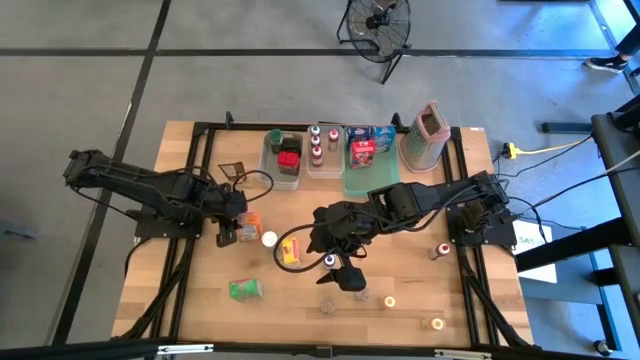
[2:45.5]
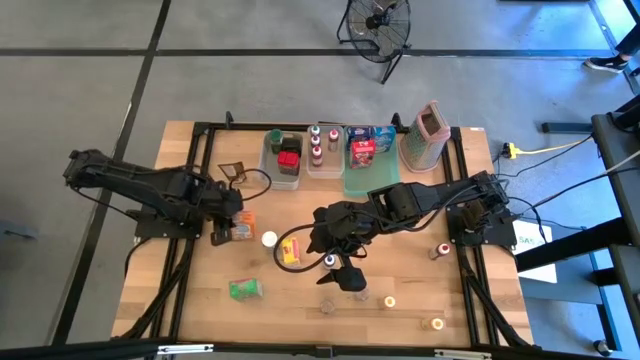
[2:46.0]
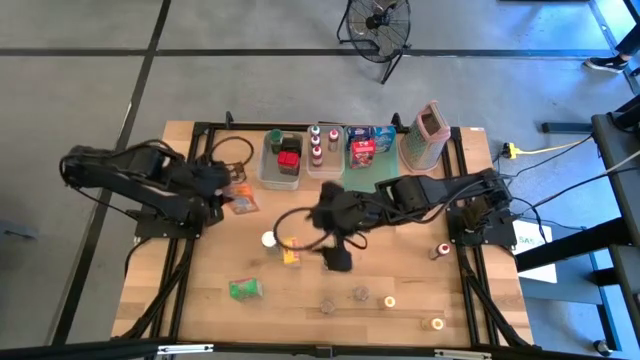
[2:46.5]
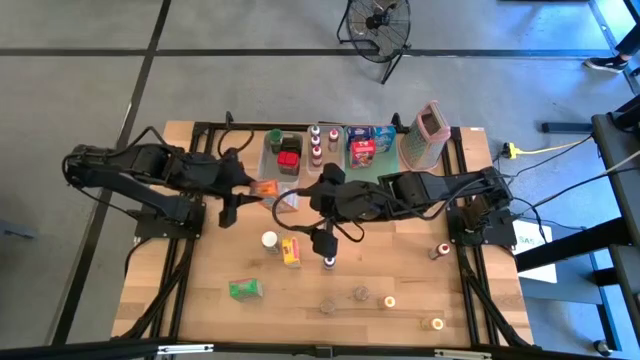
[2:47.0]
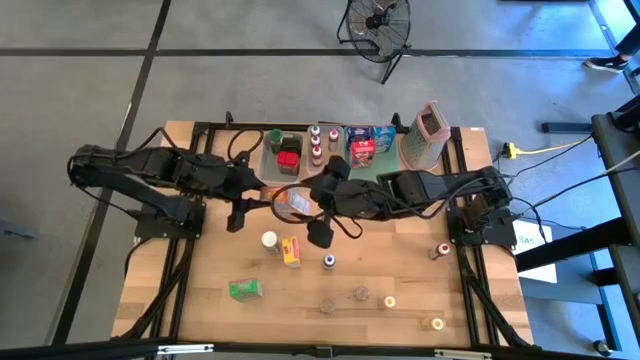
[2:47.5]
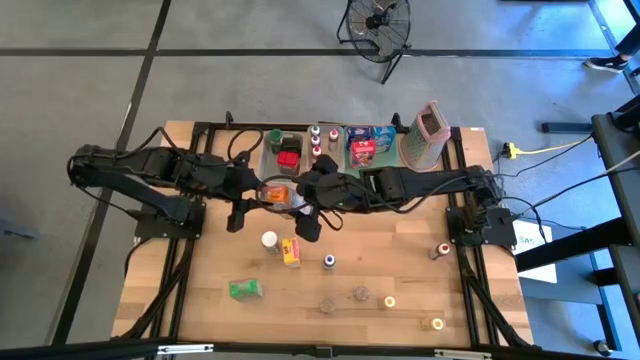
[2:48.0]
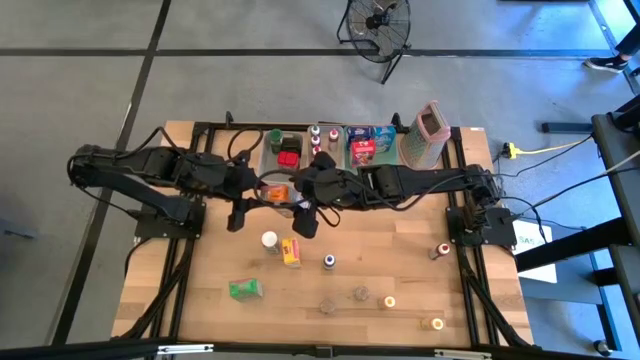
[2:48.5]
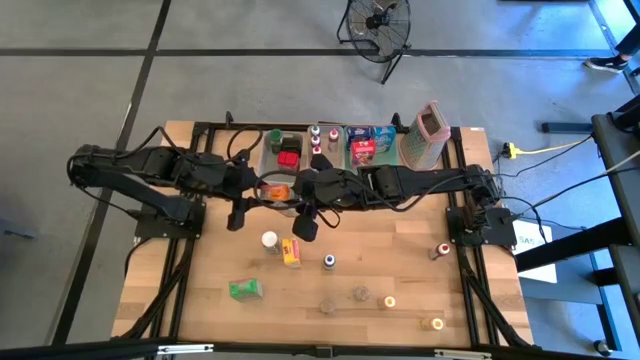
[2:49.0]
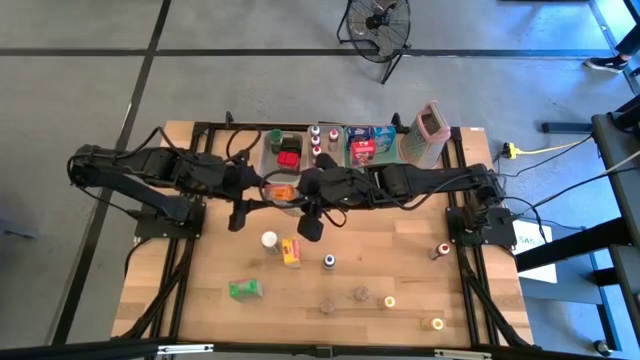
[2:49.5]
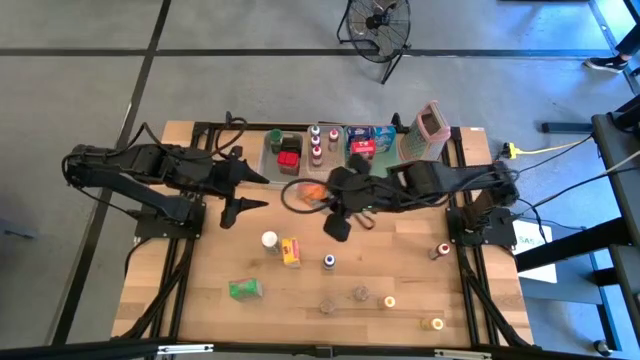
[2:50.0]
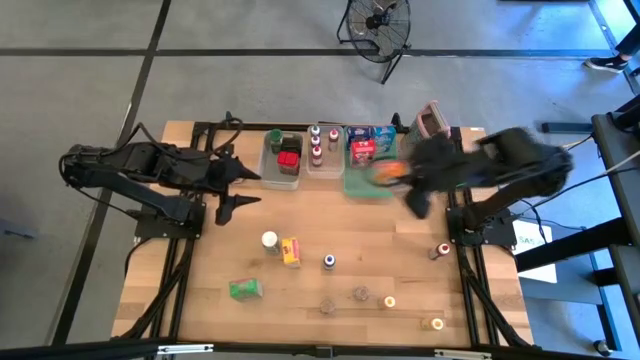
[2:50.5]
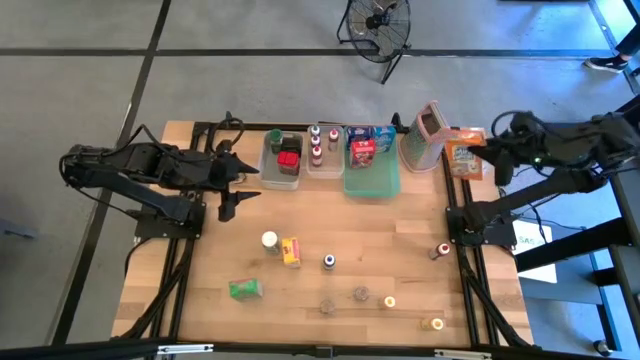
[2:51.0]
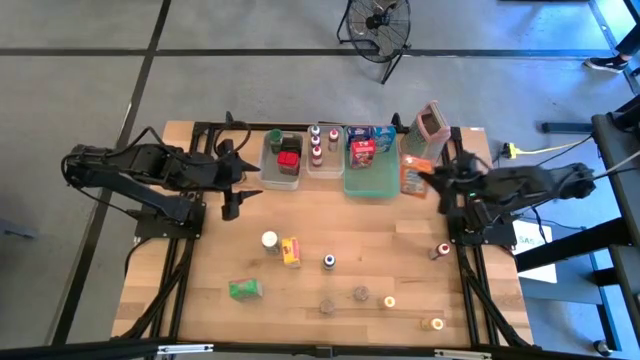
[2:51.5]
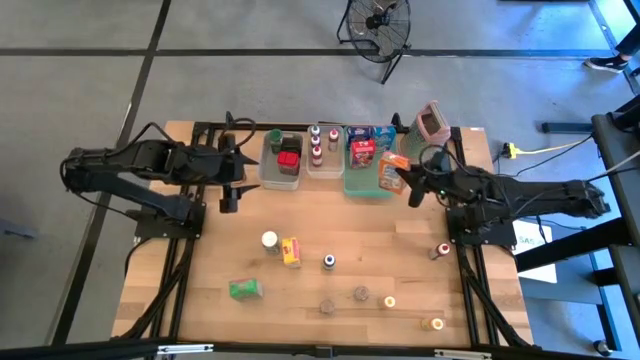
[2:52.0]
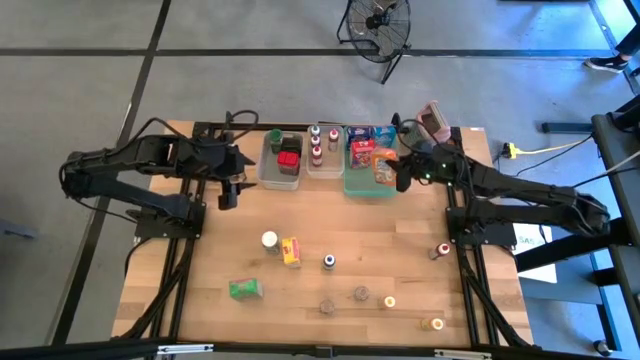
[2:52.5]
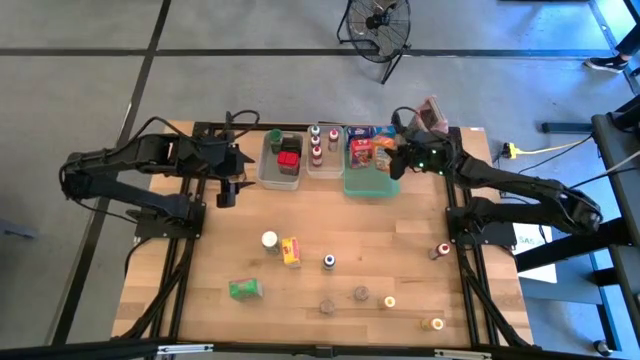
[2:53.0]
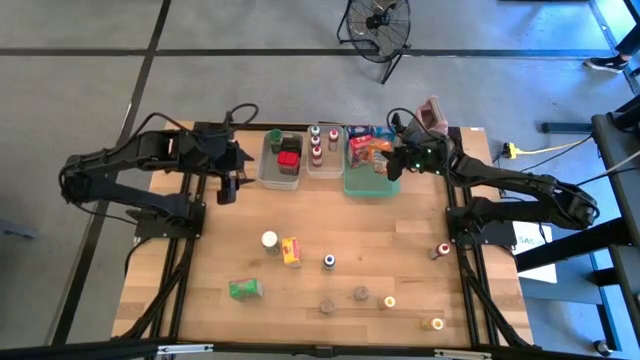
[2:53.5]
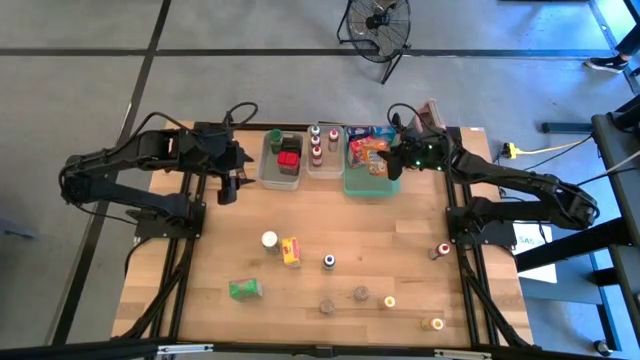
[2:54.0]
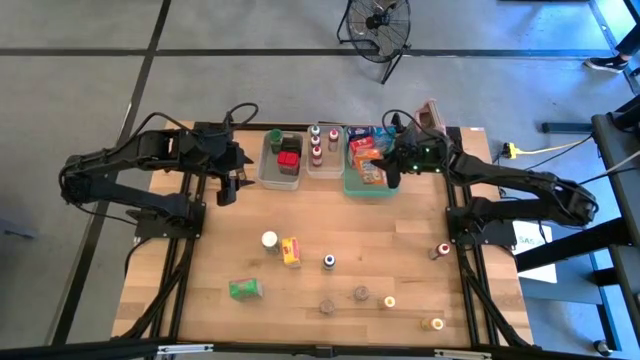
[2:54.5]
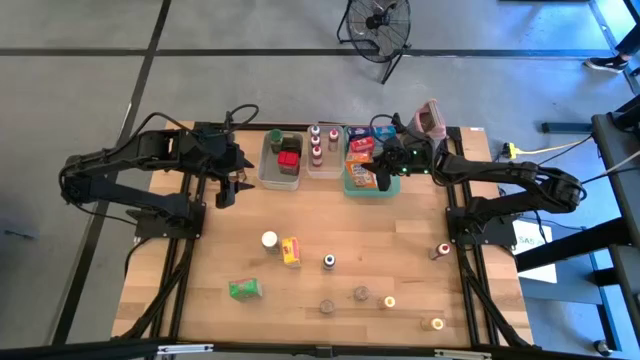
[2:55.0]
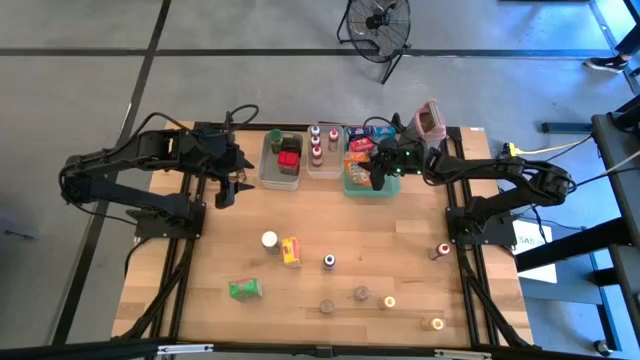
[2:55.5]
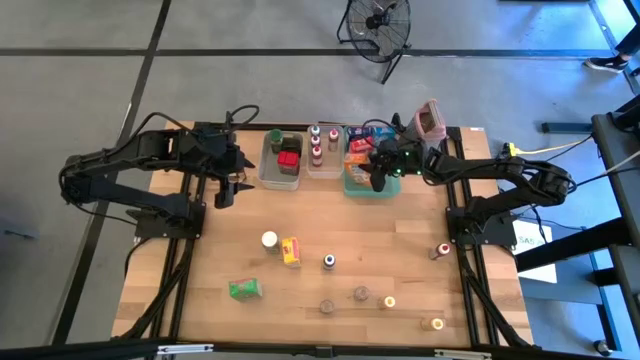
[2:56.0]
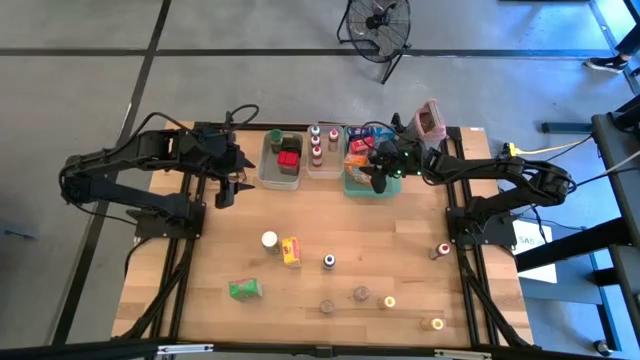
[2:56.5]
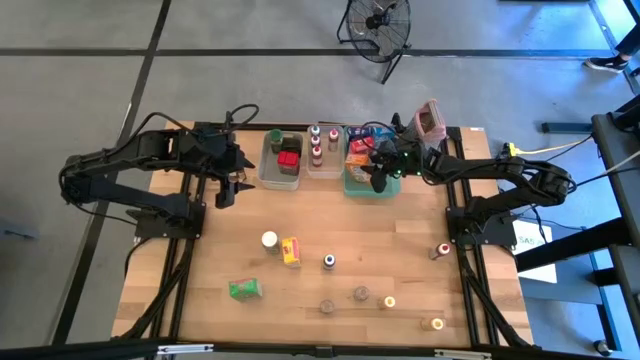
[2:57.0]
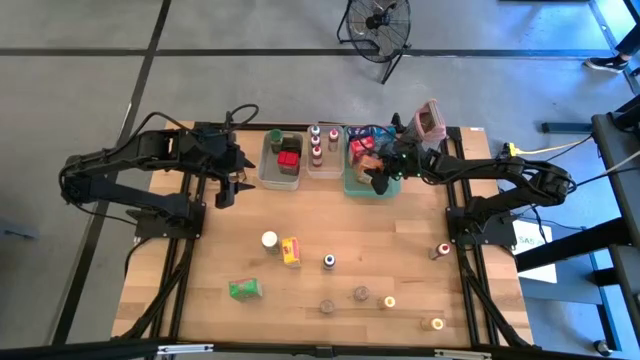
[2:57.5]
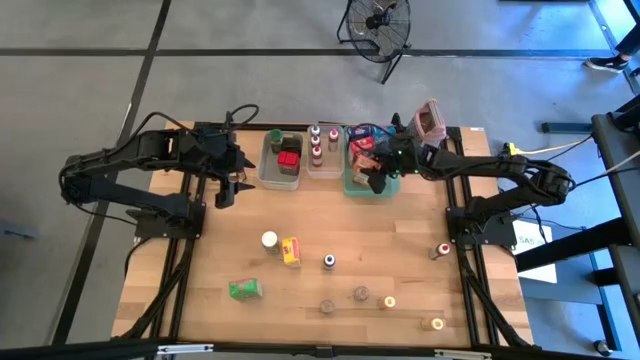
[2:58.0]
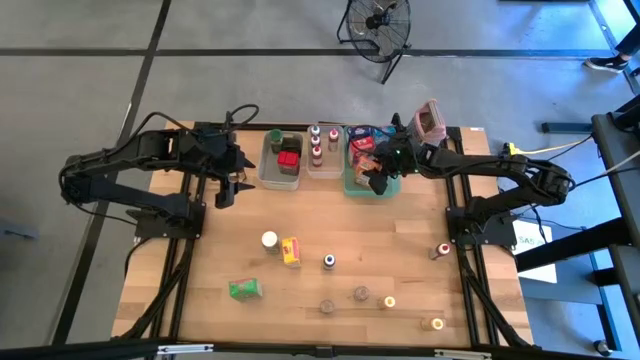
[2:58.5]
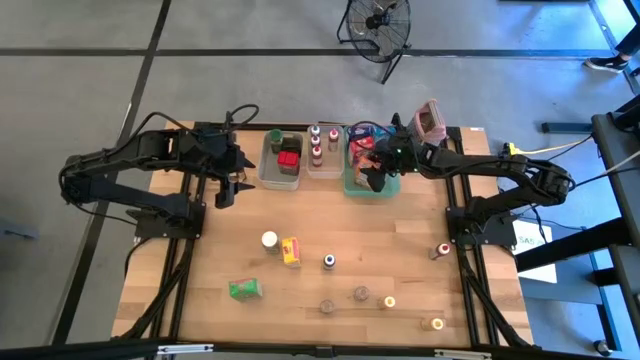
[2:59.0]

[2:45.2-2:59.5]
Task: Pick & Place Kitchen Items
Put the orange cereal box into the green bin

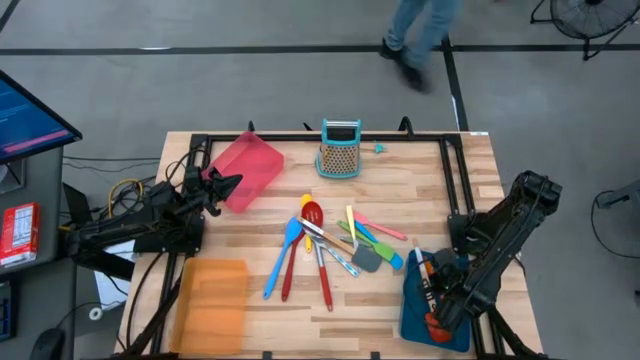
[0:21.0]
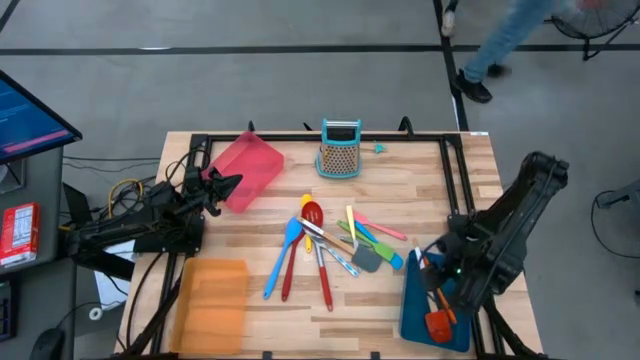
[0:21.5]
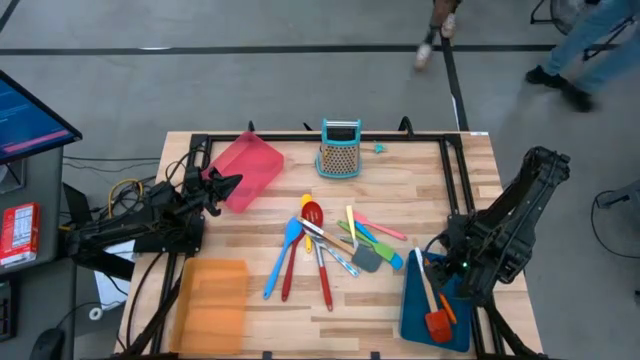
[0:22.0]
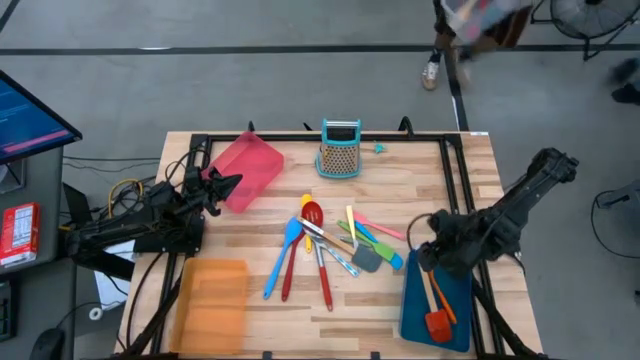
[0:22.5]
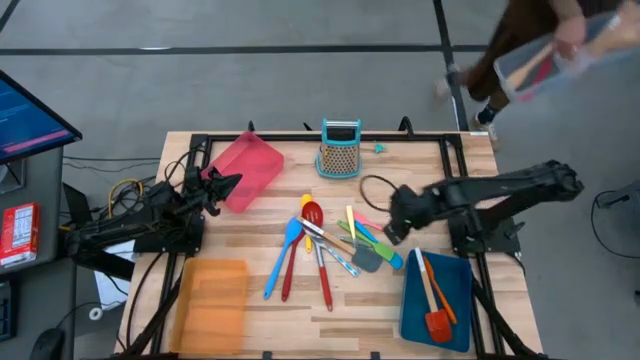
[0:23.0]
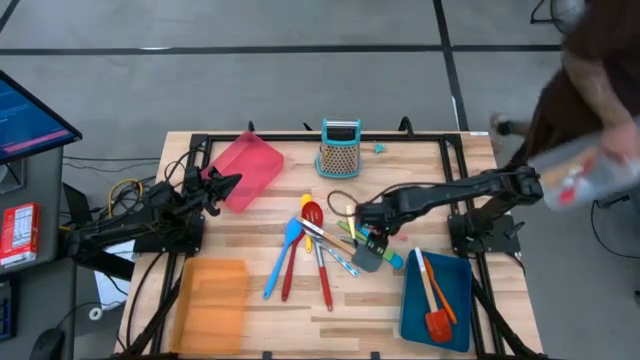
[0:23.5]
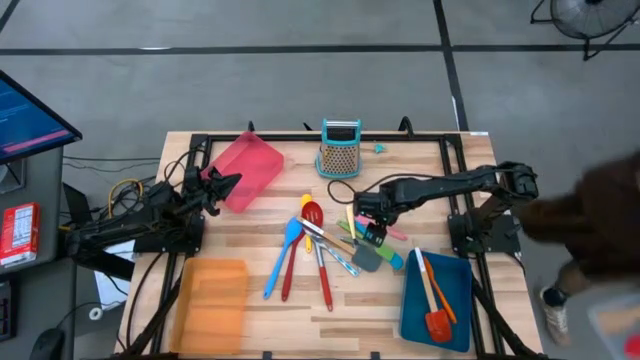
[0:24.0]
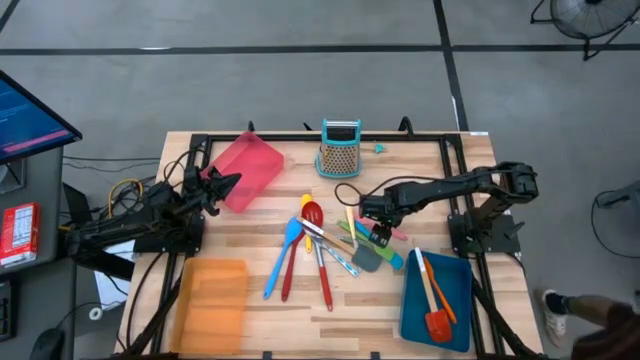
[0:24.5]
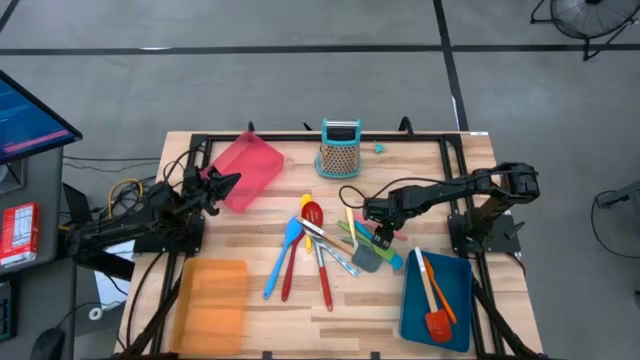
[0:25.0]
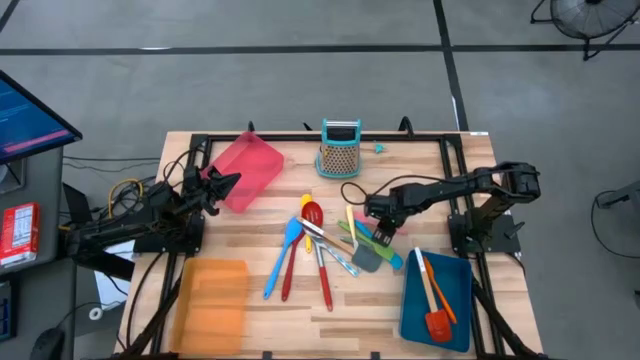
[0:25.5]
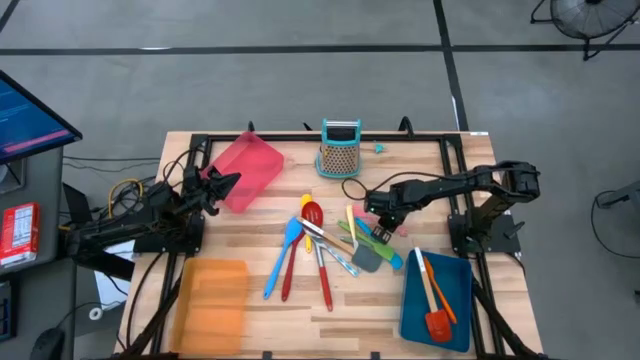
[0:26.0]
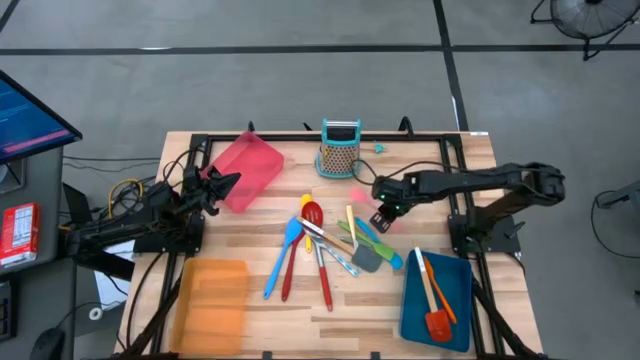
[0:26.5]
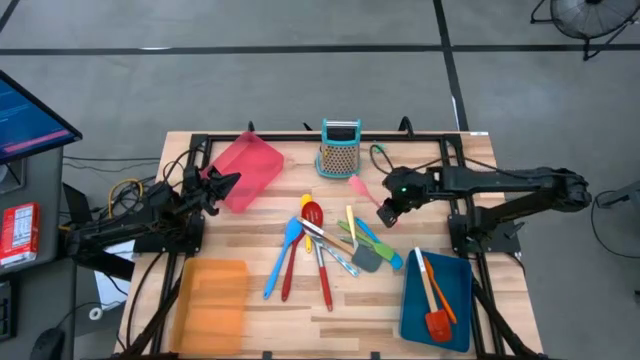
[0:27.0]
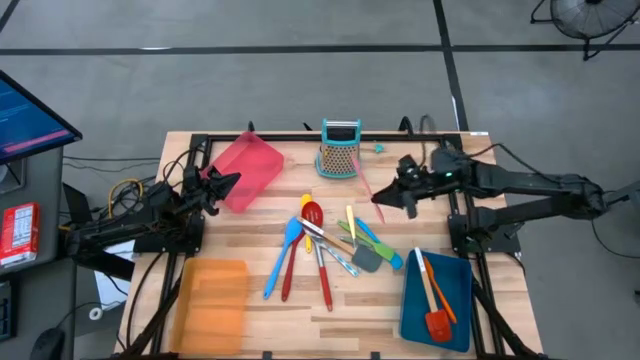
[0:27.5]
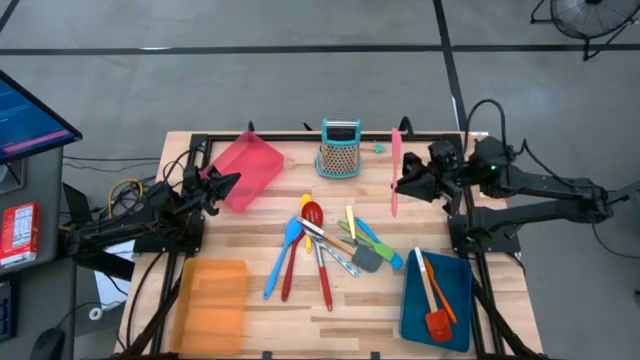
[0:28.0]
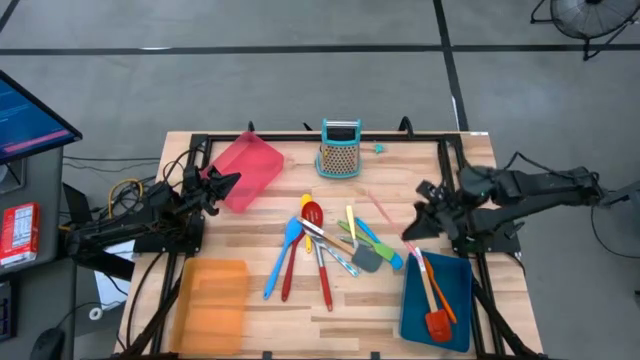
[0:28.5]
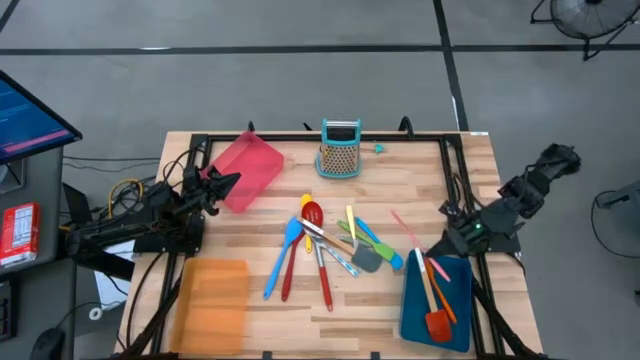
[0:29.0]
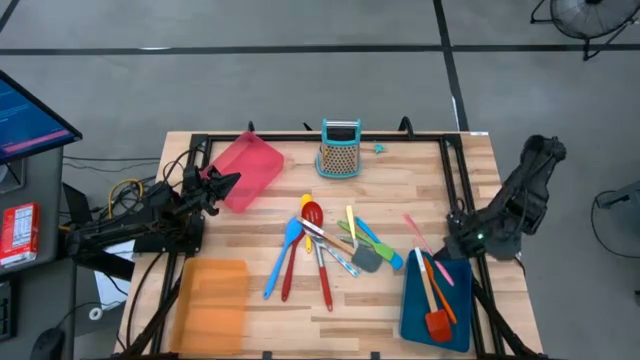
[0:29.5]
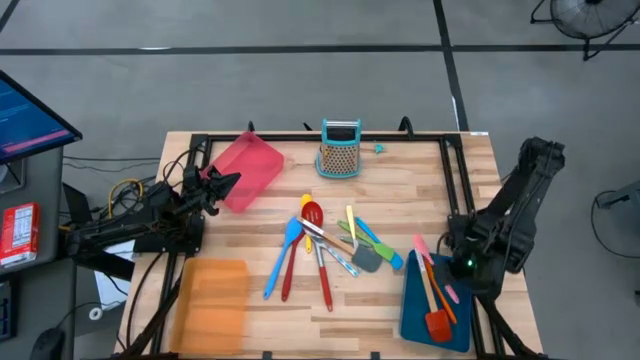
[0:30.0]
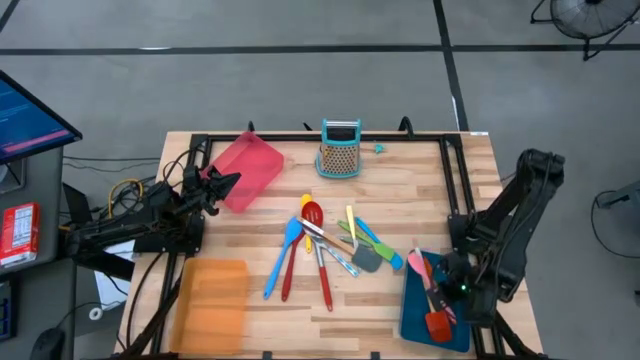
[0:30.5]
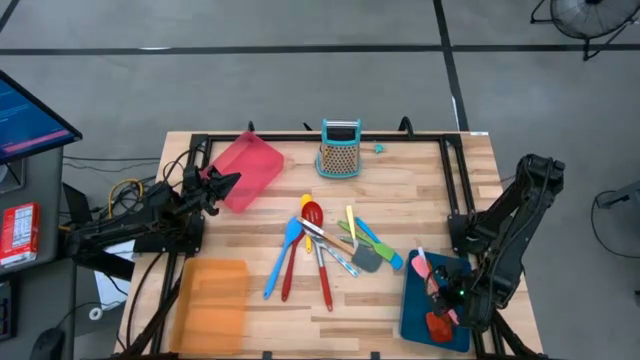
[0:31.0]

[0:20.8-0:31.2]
Task: Pick & Place Kitchen Items
Put the pink spatula into the blue bin
